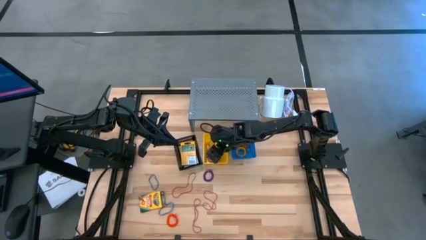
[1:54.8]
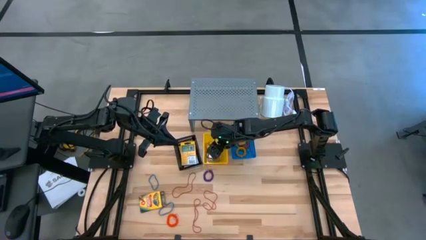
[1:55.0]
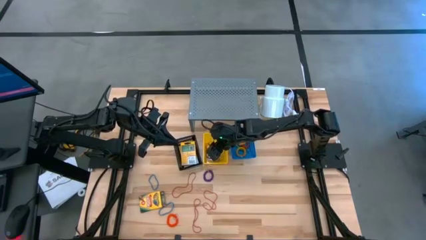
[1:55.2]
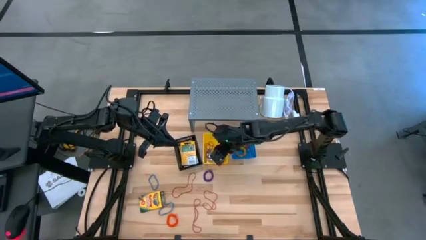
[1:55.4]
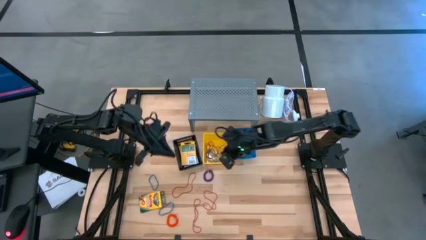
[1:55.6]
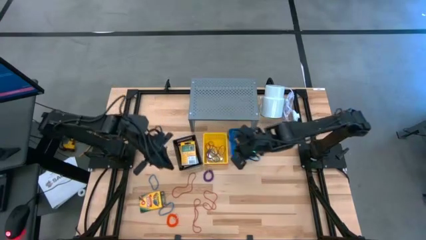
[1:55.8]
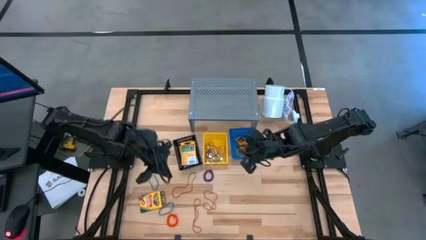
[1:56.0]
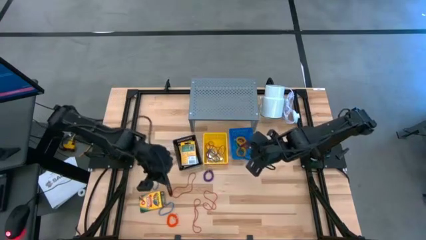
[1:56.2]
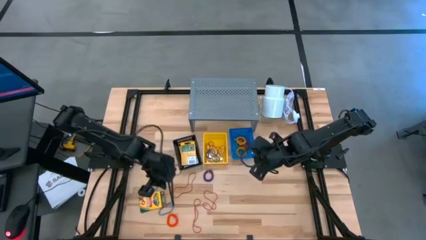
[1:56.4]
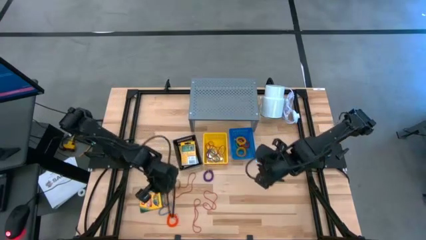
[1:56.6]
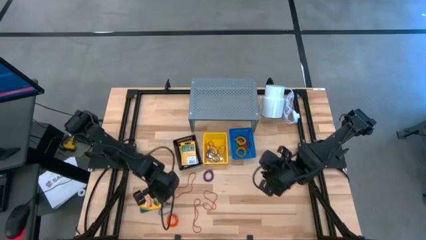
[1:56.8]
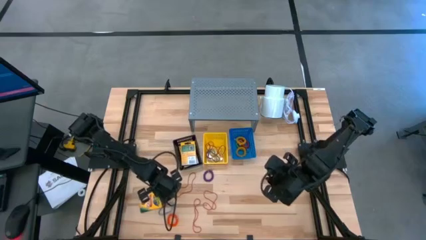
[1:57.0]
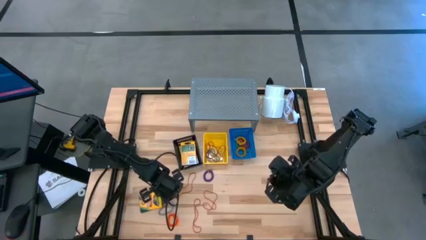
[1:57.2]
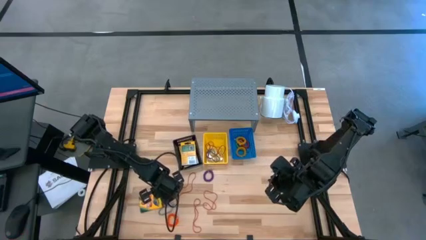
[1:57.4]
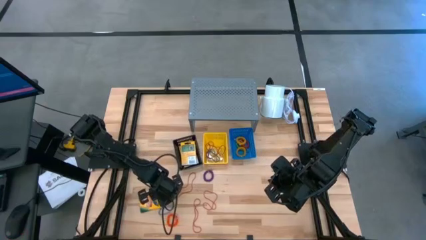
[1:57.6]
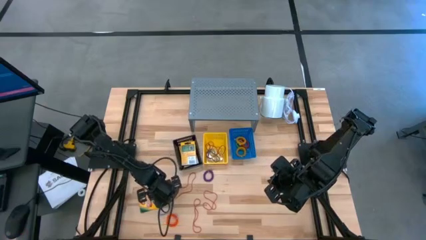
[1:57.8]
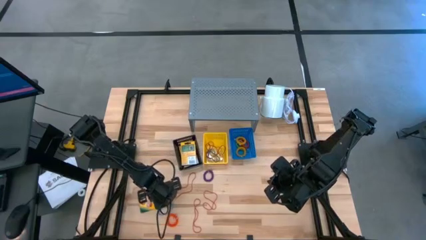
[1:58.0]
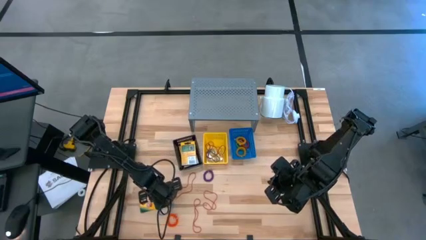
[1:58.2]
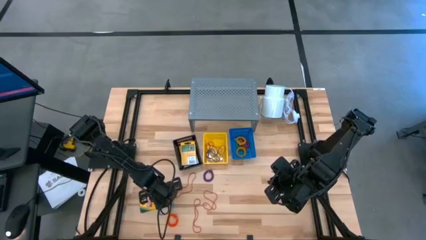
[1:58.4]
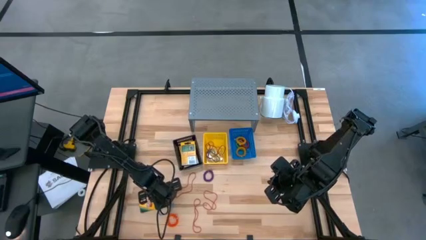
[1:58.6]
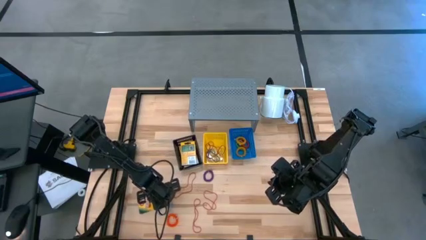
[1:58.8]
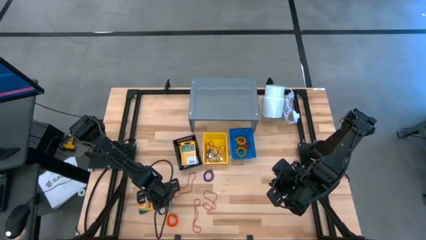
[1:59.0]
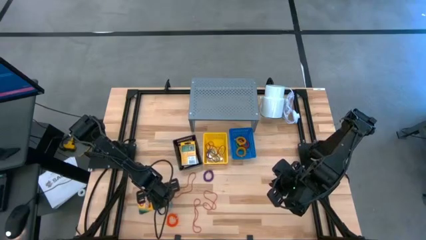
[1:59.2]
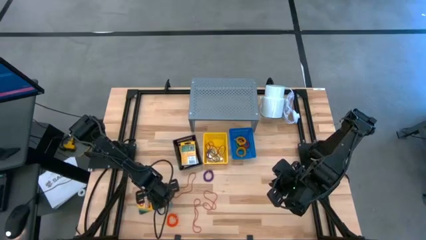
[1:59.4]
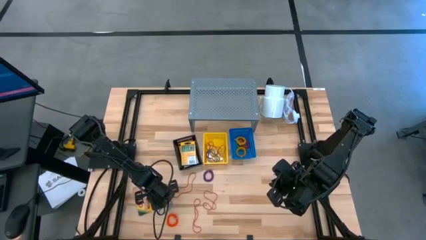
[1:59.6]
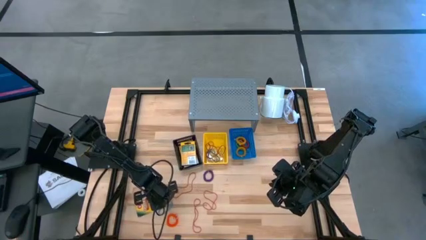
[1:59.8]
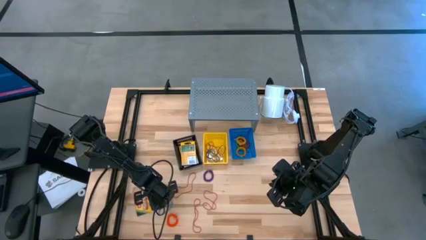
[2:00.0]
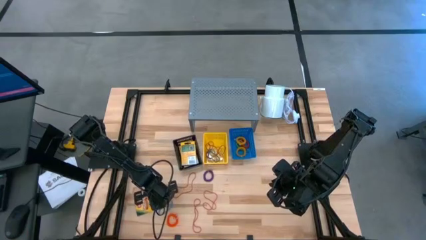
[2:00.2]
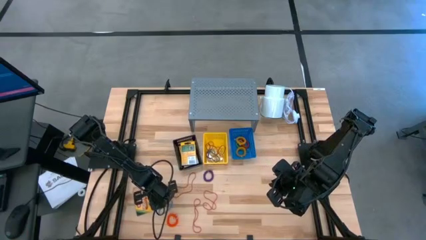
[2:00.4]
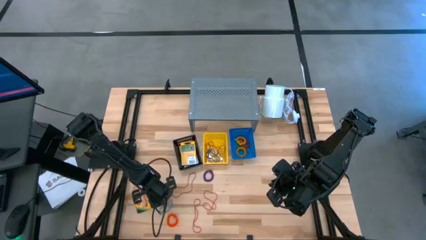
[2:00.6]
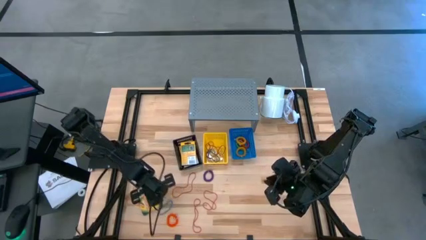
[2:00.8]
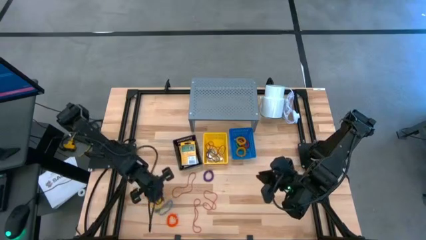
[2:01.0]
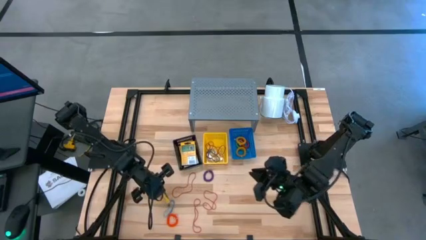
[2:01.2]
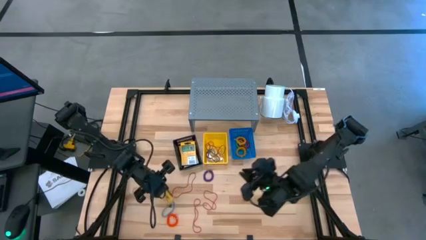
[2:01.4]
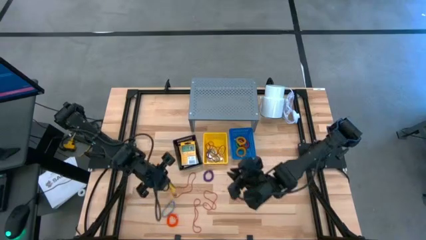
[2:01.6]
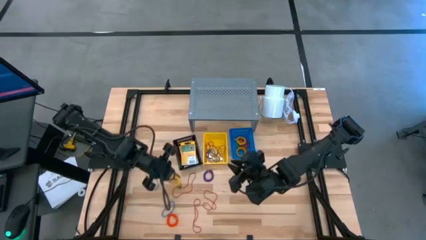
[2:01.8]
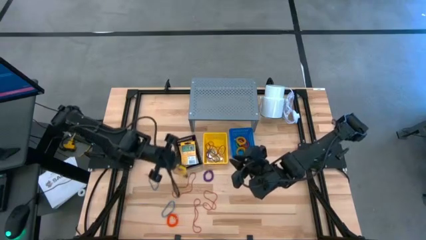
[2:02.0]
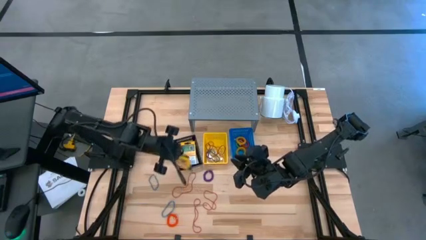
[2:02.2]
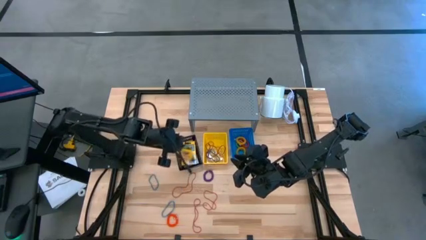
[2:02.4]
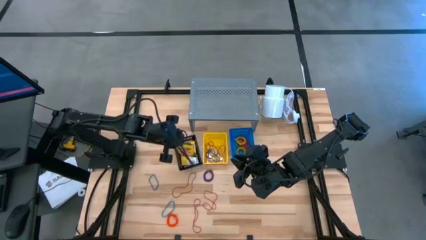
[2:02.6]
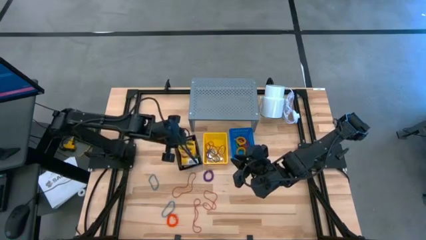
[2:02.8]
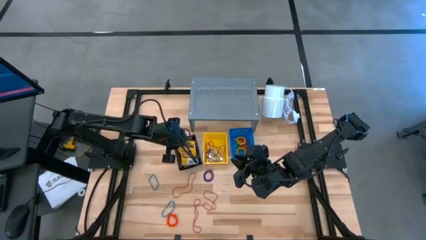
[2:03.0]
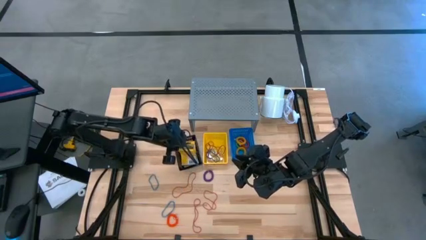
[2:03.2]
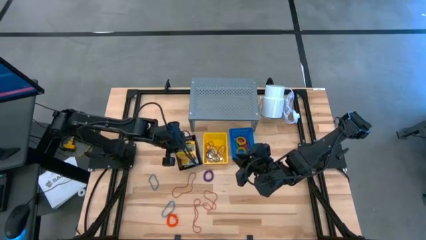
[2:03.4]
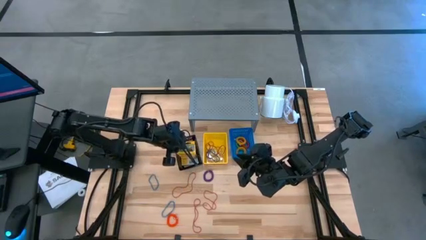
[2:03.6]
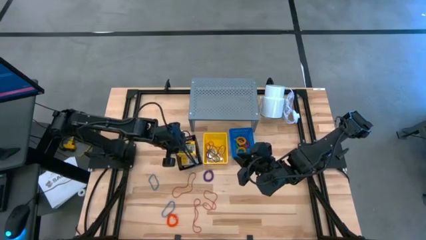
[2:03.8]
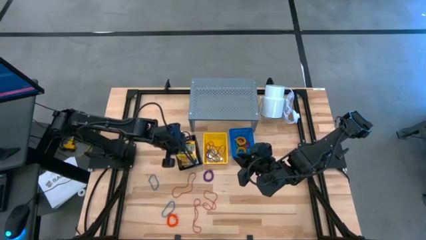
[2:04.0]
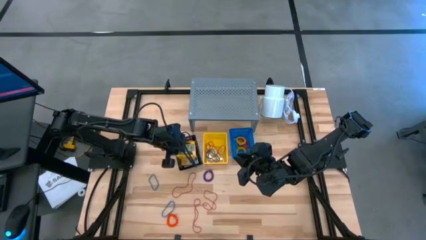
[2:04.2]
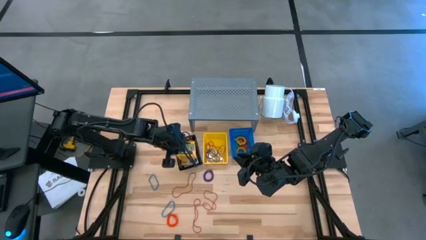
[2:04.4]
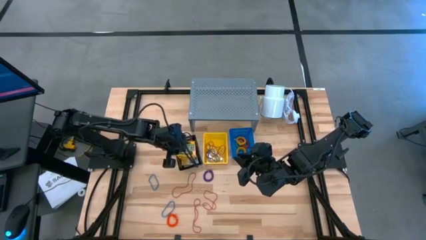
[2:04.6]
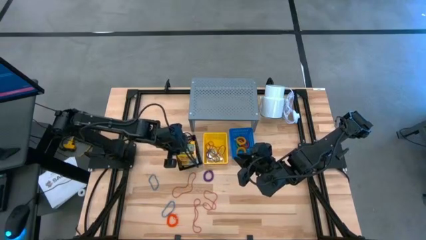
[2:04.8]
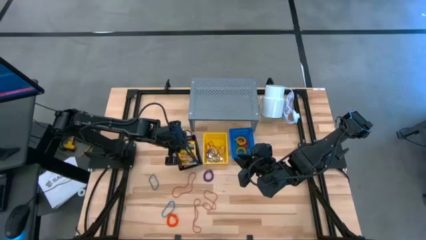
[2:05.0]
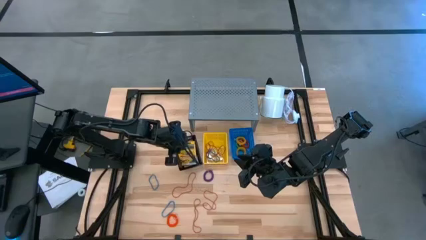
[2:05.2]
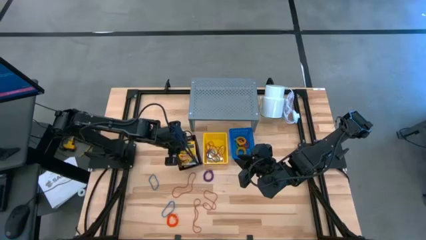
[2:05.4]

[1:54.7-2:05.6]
Task: Pick & Place Office Desk Supplies
Put the crayon box into the black basket

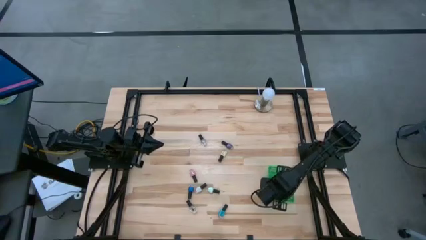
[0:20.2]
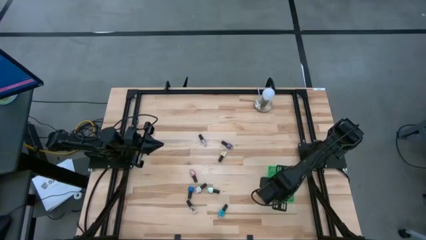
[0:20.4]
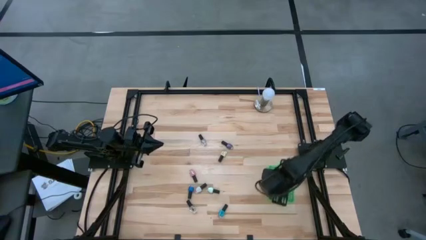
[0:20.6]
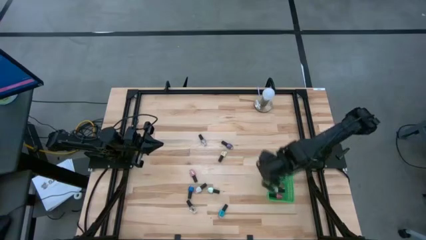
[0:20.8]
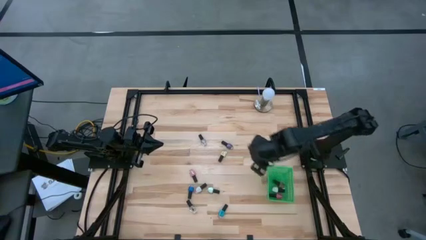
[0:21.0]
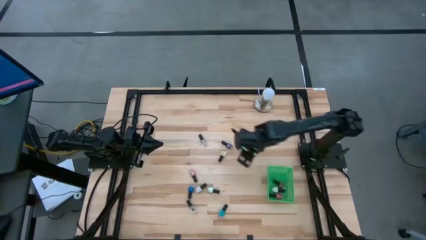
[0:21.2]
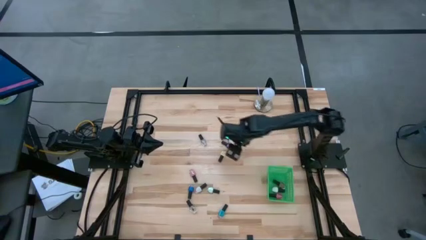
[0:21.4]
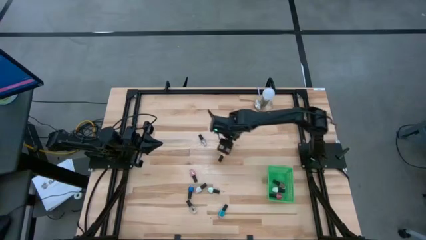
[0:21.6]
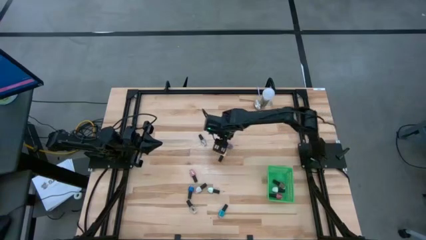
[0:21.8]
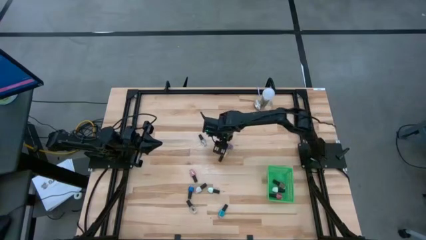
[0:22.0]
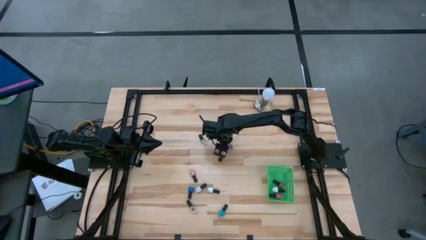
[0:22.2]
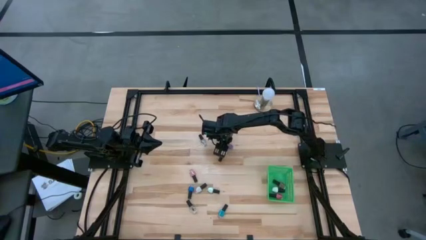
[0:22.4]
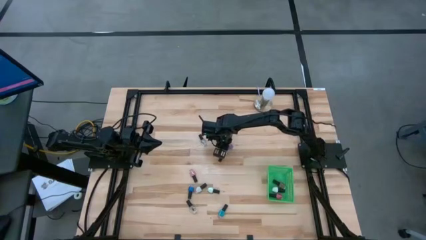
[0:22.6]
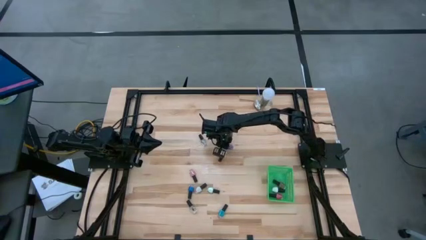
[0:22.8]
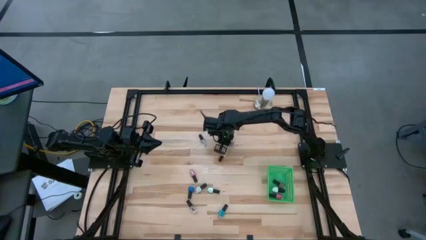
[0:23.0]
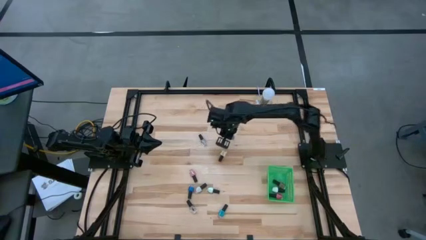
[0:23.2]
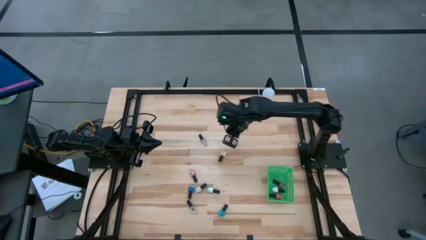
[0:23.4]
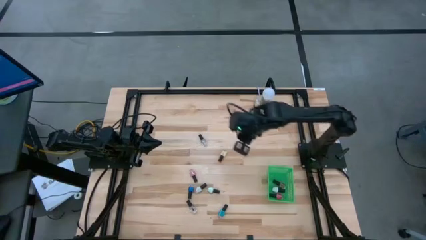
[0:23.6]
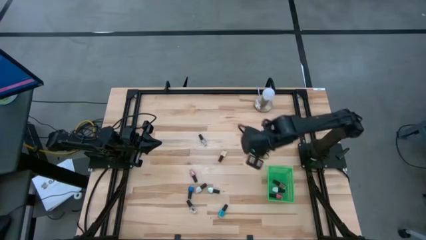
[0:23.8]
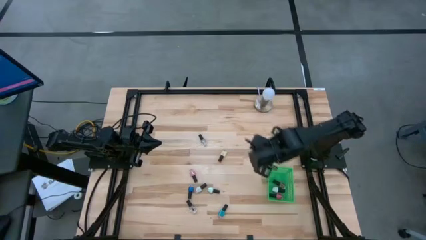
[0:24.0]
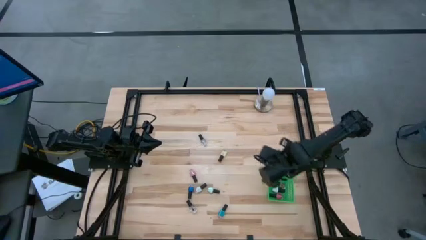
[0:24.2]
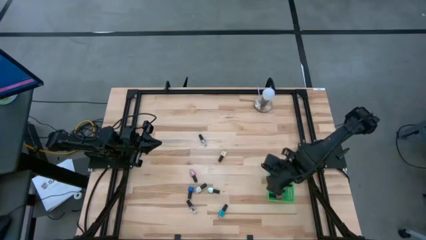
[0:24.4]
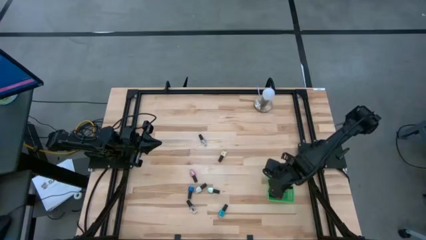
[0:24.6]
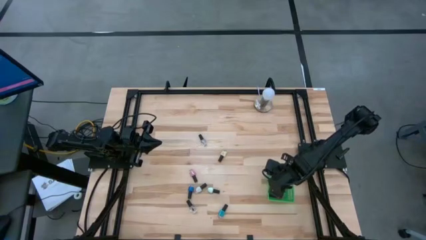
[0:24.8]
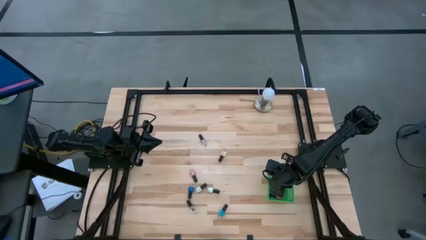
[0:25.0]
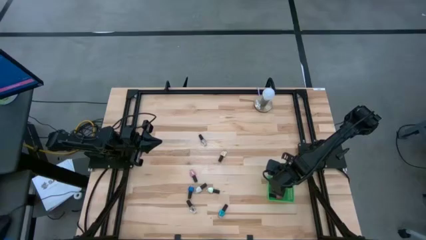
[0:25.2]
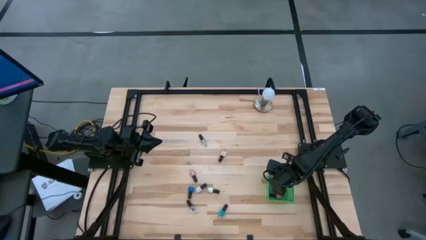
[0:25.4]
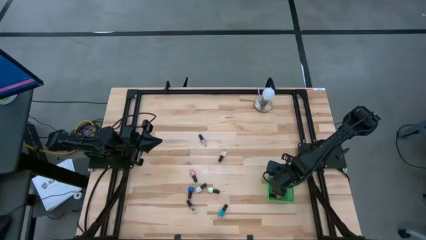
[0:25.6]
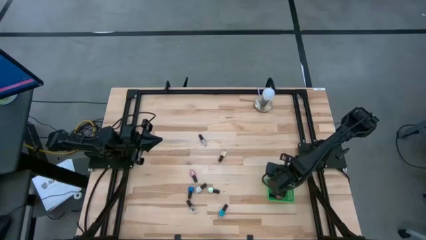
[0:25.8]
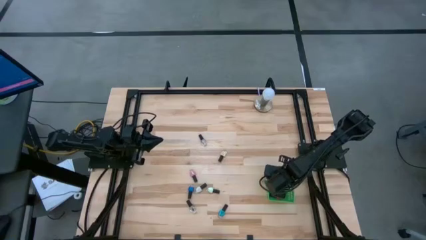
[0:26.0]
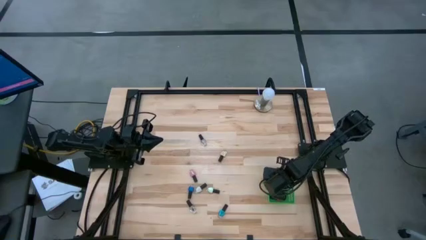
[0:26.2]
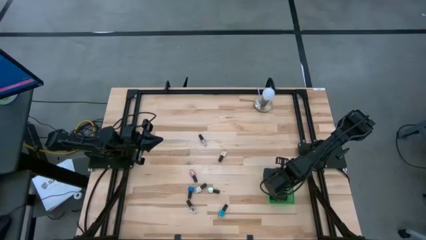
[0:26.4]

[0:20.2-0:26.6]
Task: Pick & Place Nail Polish
Put the purple nail polish into the green bin
